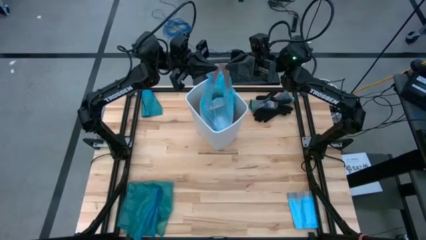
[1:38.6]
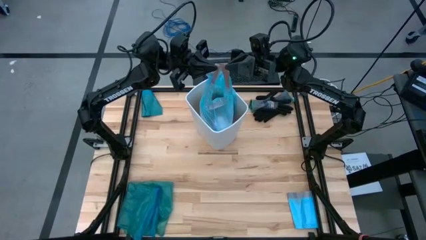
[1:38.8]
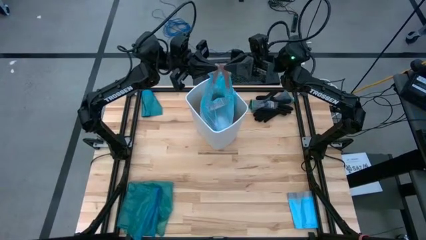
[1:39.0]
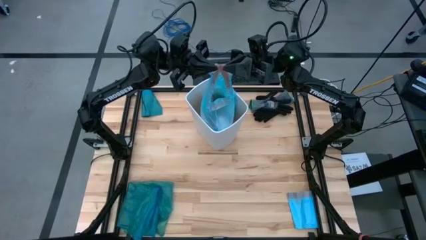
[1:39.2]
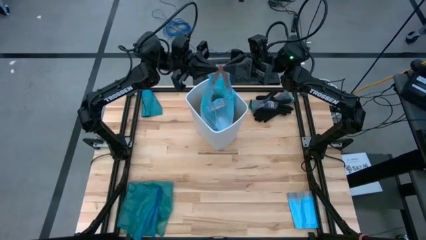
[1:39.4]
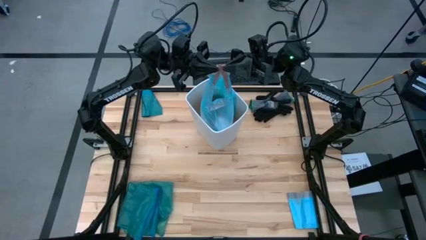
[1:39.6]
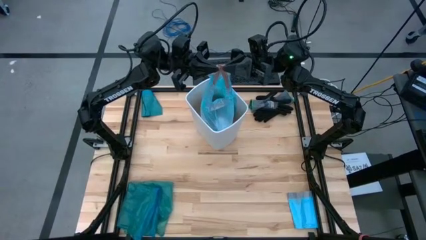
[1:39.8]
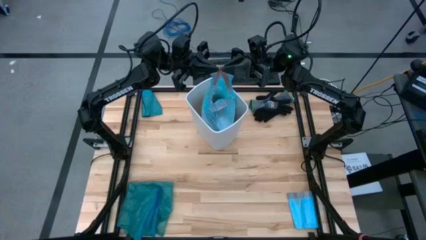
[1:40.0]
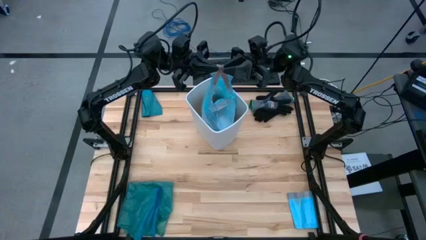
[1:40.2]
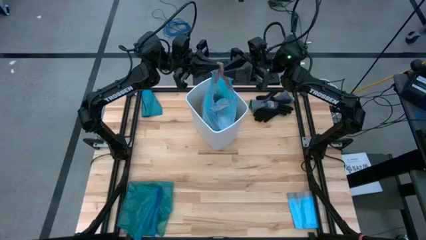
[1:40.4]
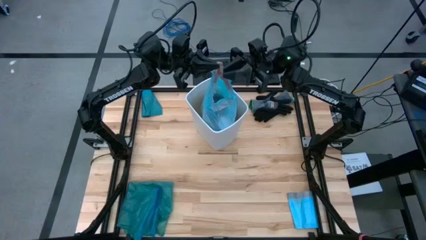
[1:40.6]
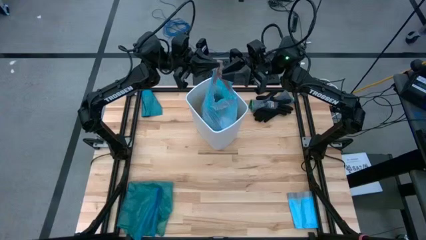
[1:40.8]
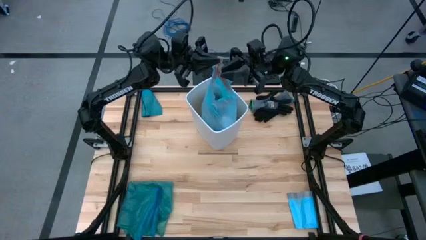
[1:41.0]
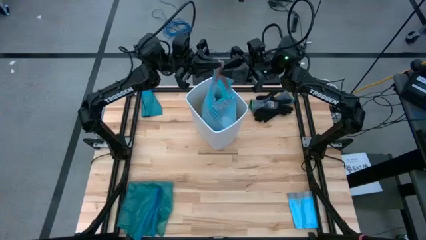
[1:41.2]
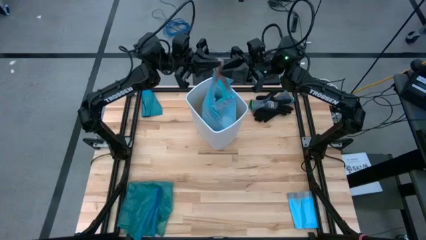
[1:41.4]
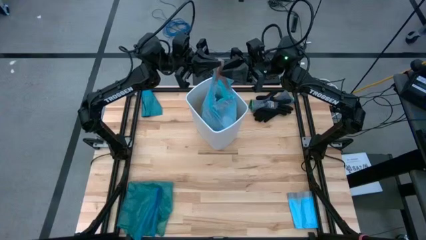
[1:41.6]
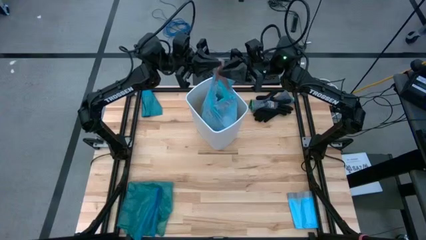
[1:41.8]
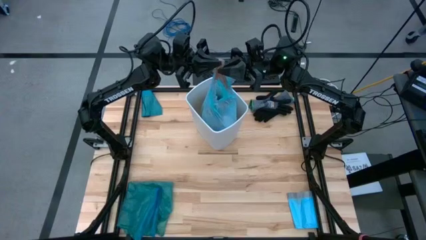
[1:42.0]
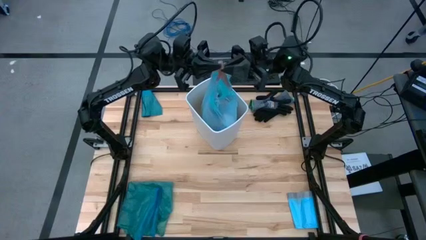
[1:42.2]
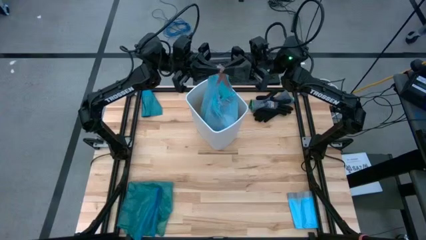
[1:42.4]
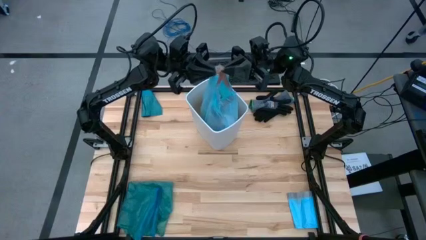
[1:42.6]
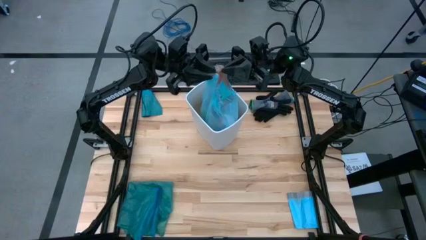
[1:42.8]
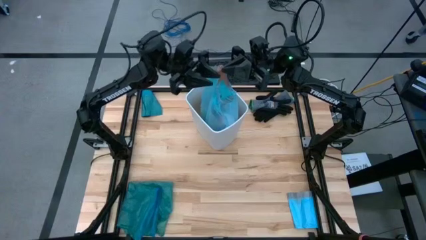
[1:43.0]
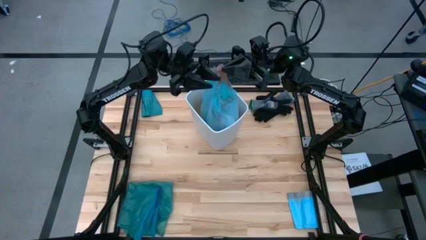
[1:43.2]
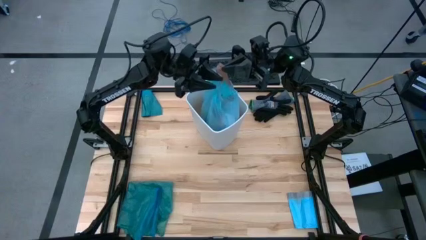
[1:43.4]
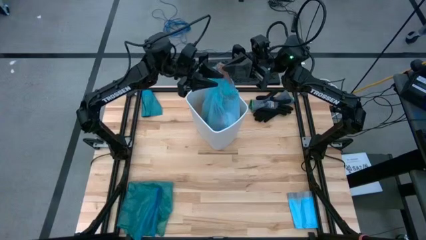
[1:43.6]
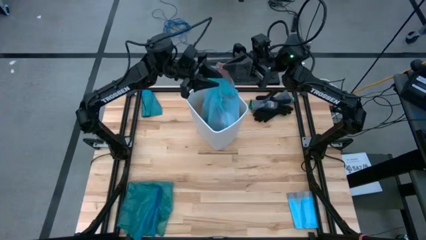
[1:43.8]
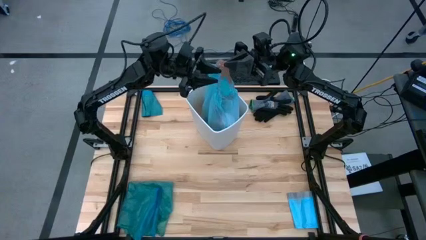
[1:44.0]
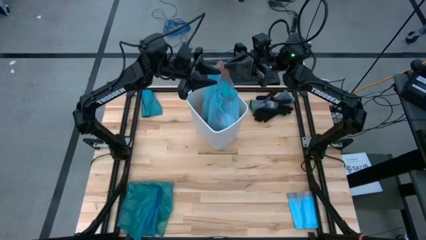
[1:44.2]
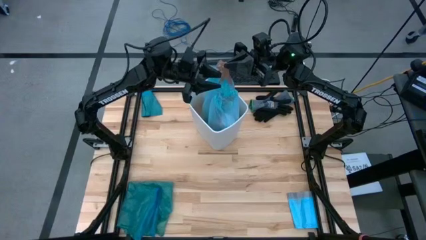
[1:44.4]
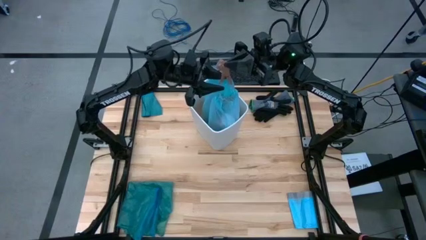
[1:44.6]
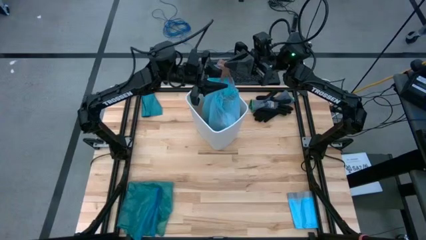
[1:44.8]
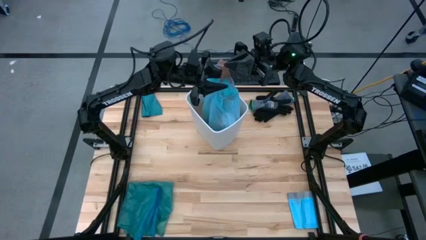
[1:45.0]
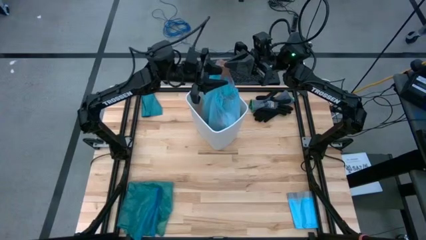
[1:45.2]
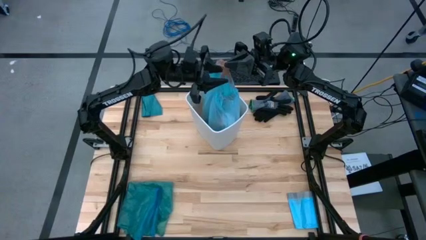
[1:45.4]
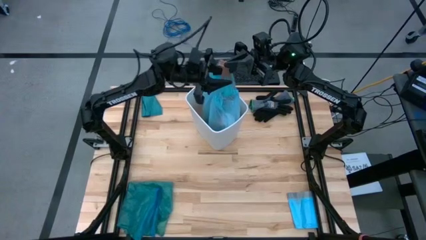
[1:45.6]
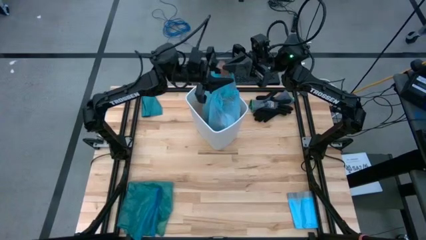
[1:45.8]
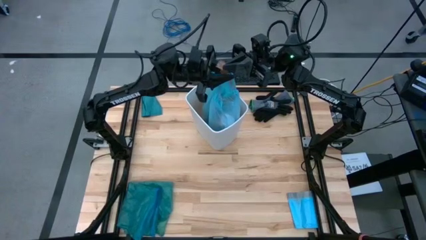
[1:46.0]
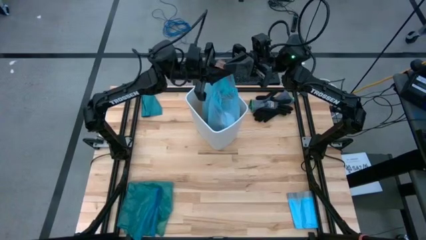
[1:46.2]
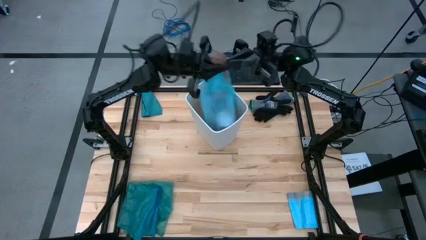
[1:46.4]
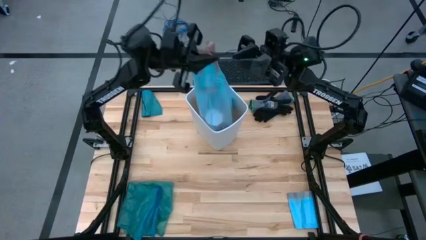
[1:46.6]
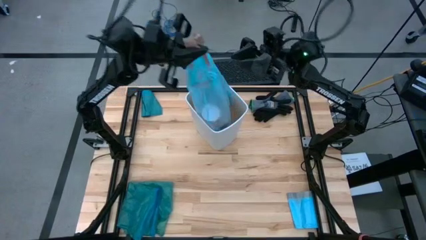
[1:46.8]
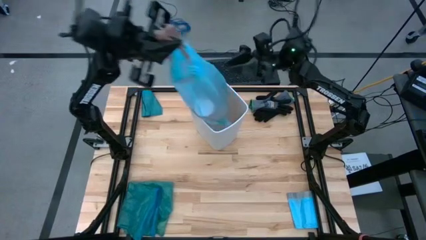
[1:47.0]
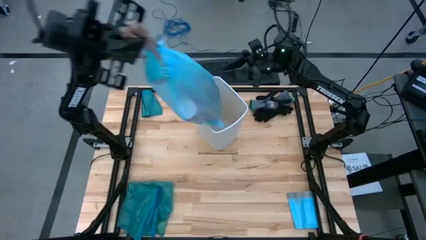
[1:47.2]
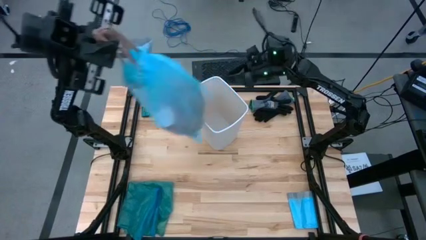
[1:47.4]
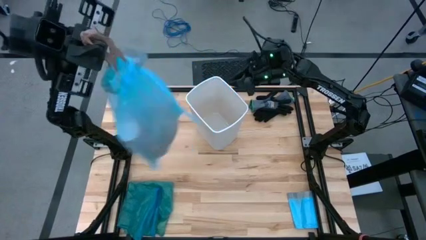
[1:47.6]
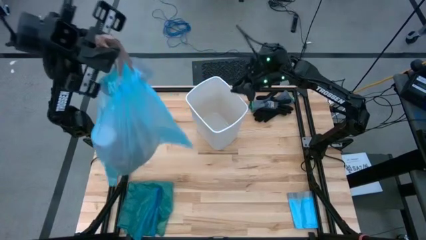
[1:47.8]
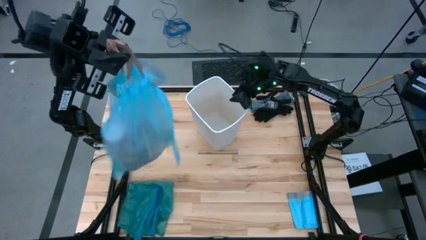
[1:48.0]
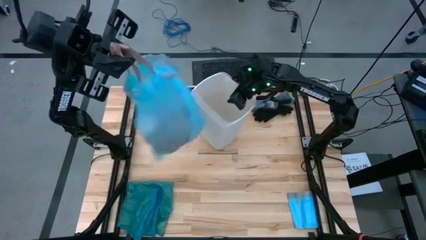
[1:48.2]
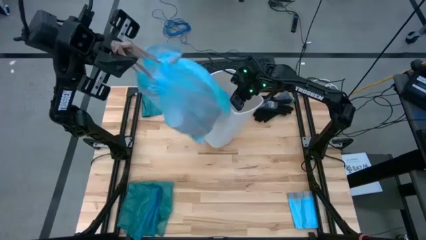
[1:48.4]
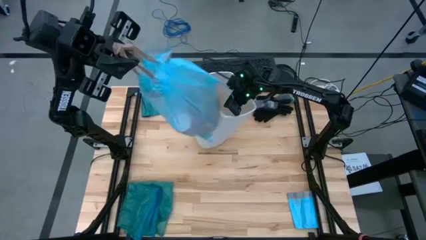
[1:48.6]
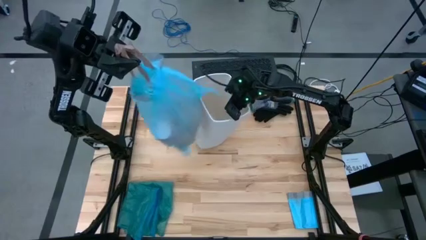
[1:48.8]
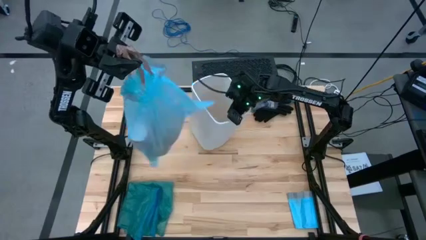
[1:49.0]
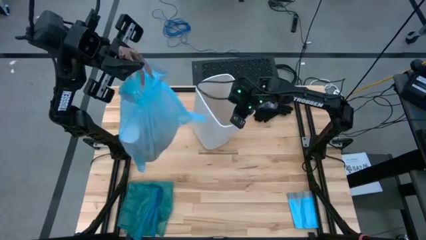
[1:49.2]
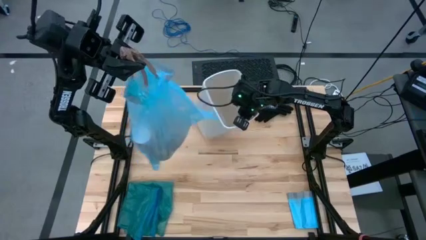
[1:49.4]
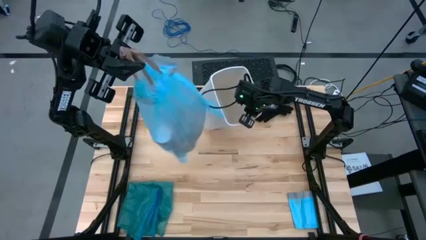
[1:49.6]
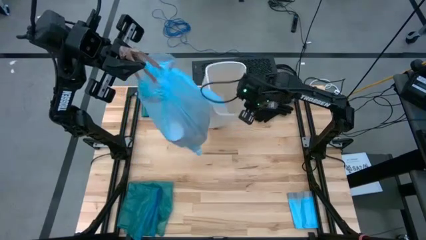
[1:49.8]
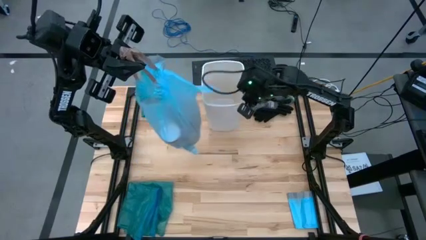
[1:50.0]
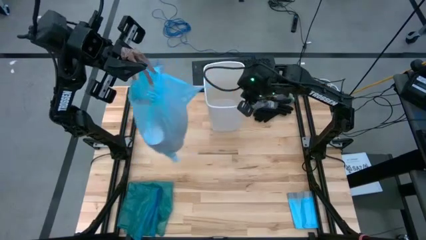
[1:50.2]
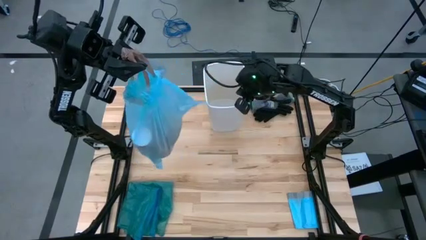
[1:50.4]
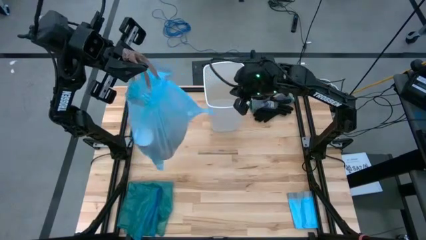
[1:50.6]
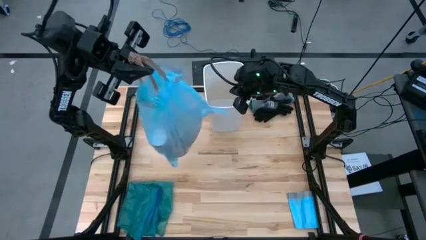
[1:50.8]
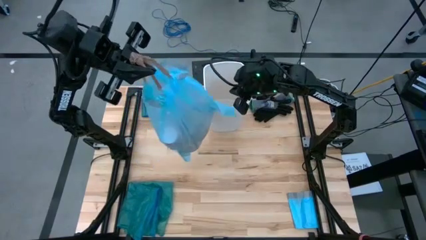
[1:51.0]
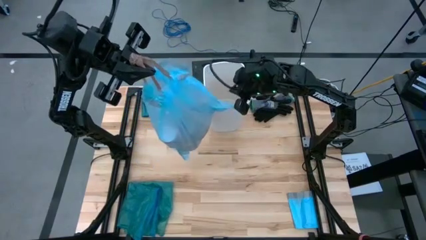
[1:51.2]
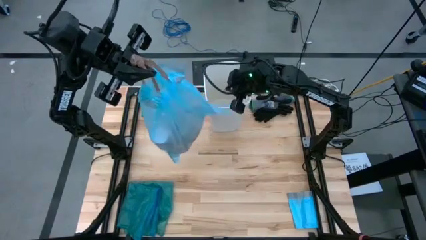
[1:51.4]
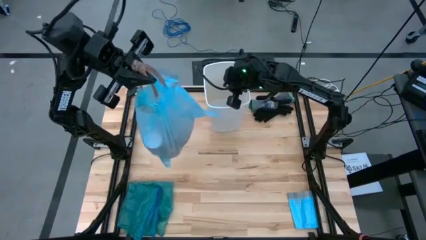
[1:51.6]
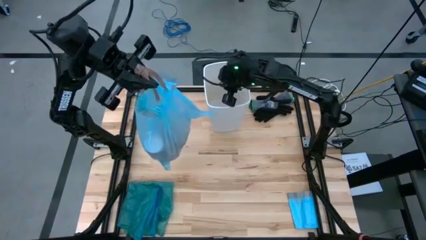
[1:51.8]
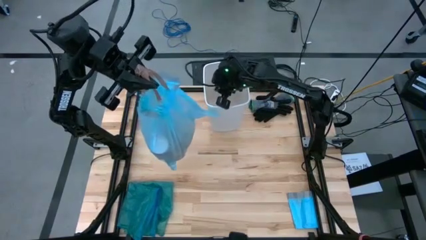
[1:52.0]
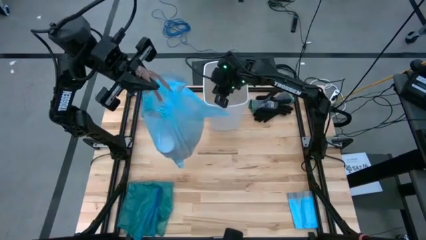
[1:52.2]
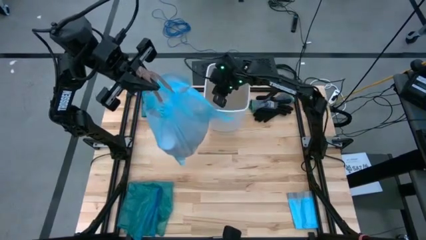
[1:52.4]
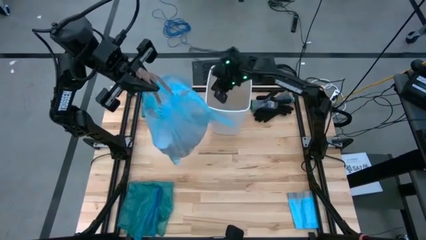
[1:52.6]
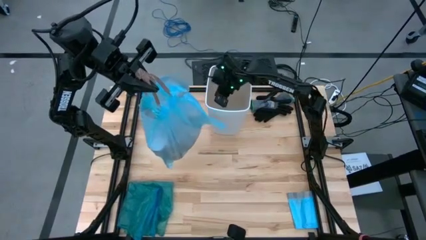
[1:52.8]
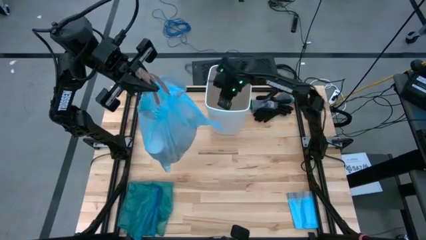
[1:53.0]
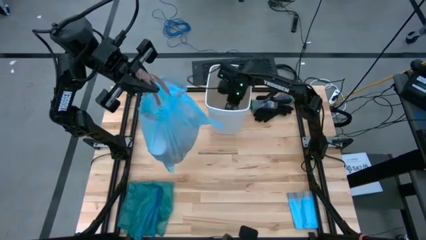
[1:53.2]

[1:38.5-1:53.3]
Task: place trash/remove bag and relplace
Remove the light blue trash bag from the white trash bin
